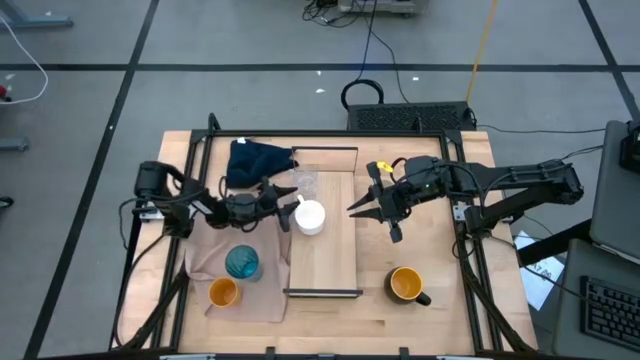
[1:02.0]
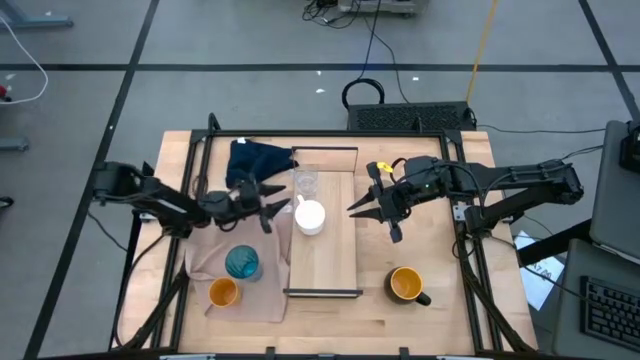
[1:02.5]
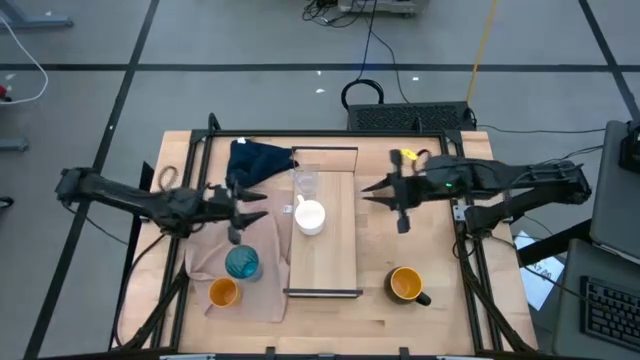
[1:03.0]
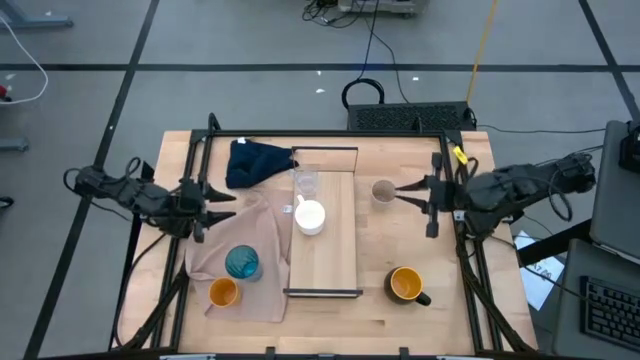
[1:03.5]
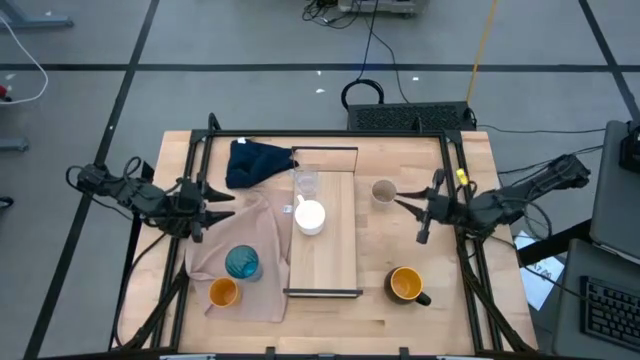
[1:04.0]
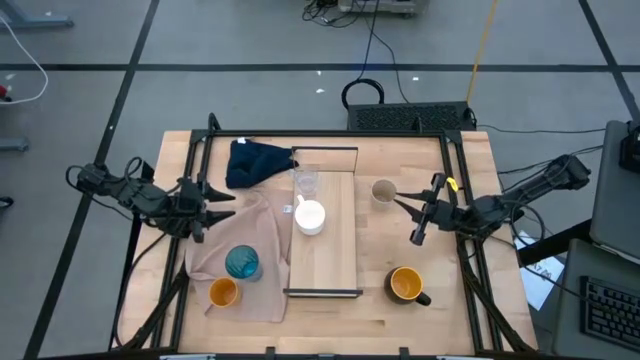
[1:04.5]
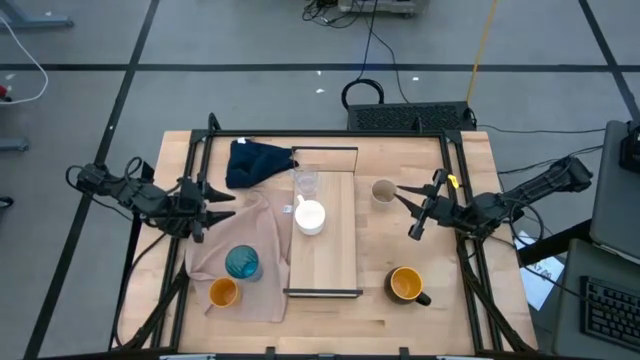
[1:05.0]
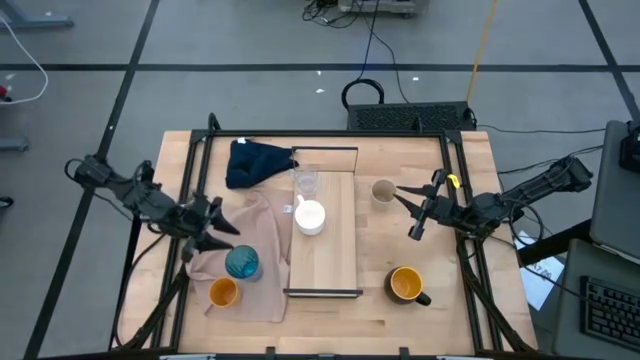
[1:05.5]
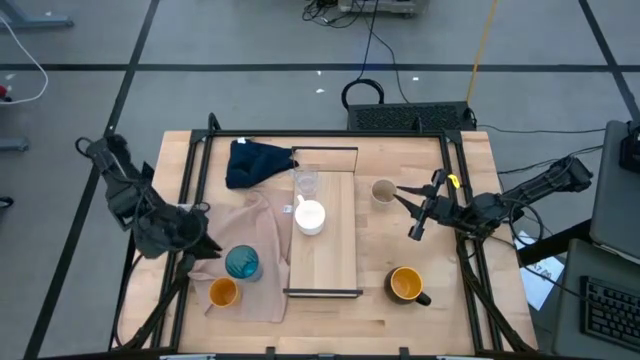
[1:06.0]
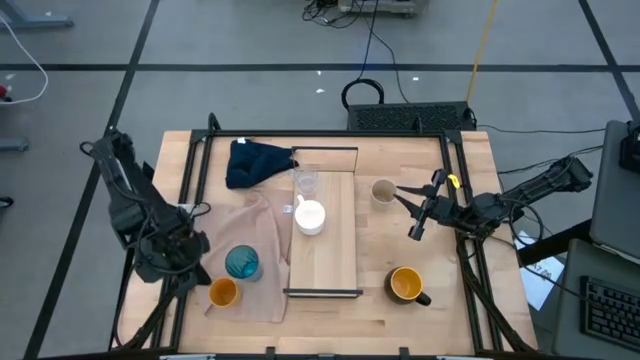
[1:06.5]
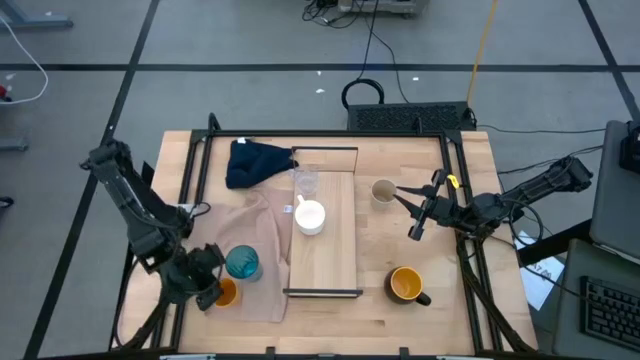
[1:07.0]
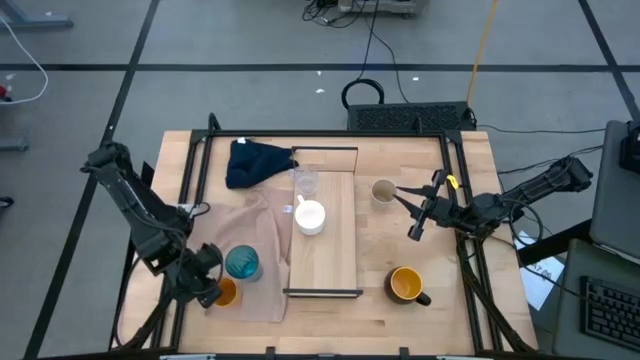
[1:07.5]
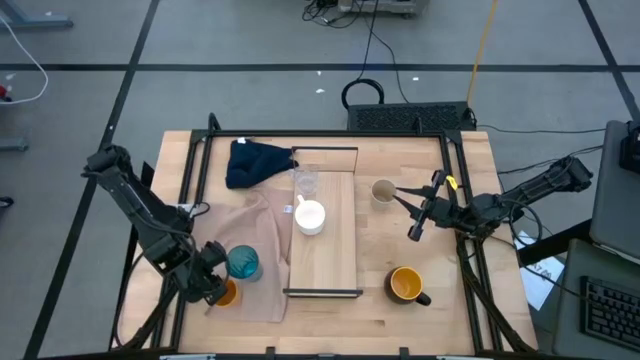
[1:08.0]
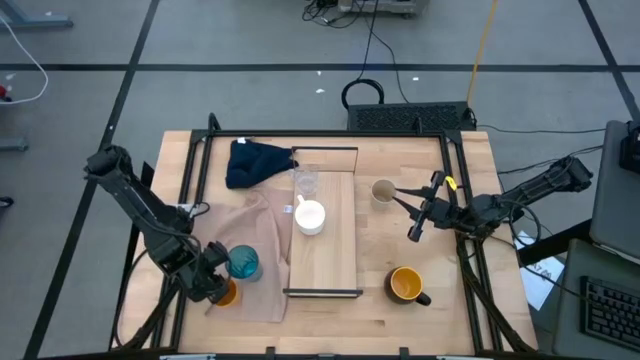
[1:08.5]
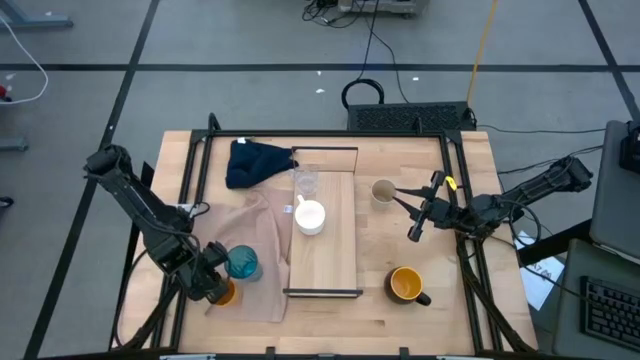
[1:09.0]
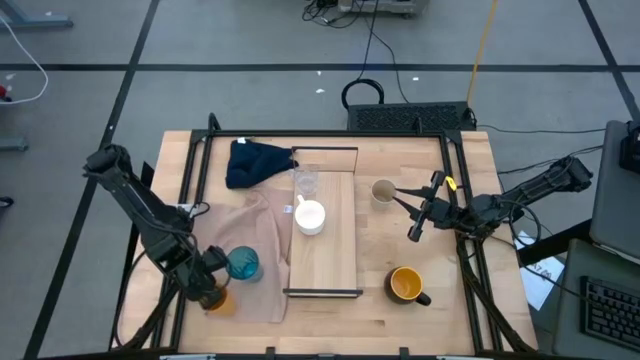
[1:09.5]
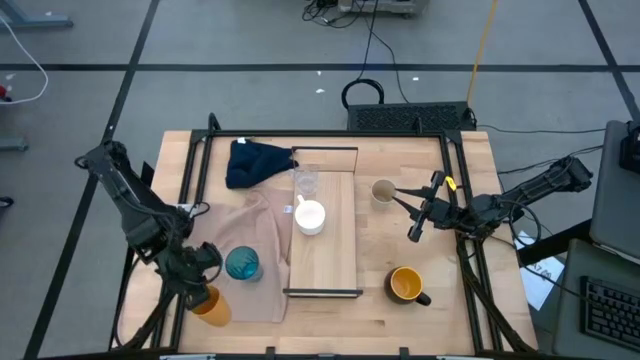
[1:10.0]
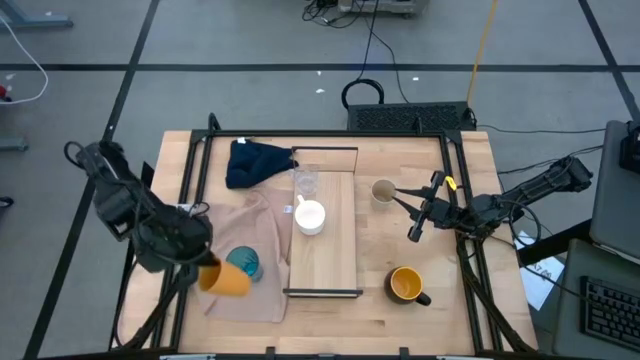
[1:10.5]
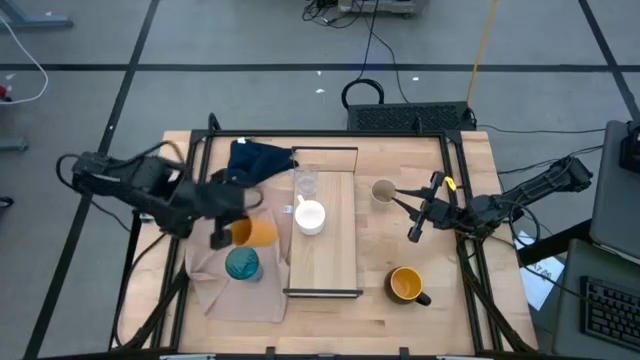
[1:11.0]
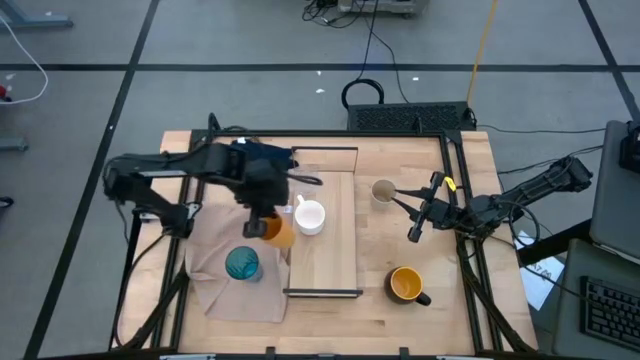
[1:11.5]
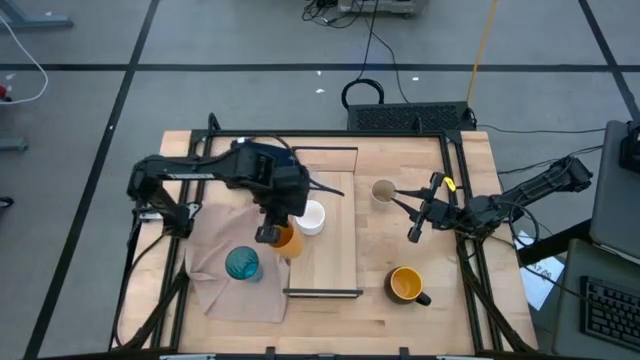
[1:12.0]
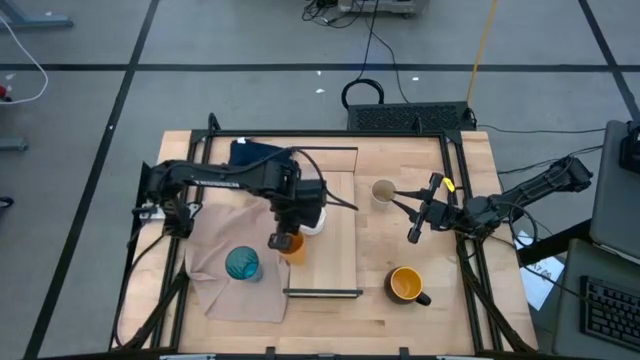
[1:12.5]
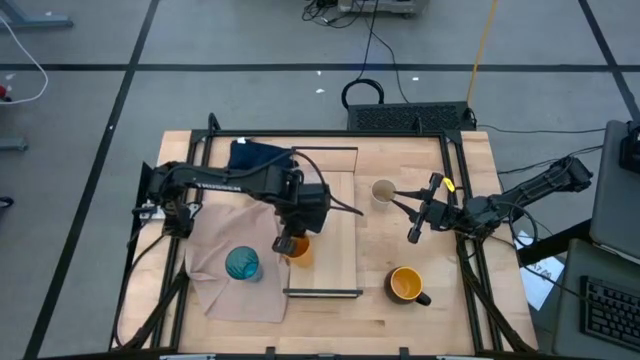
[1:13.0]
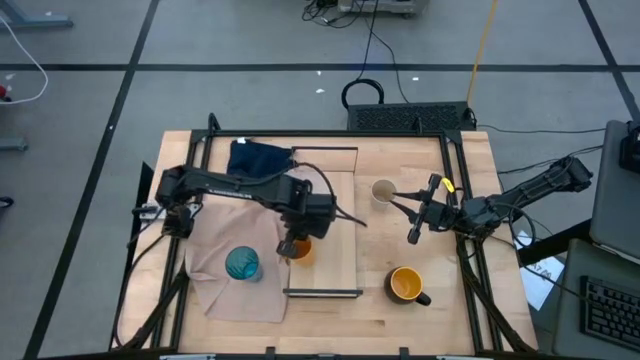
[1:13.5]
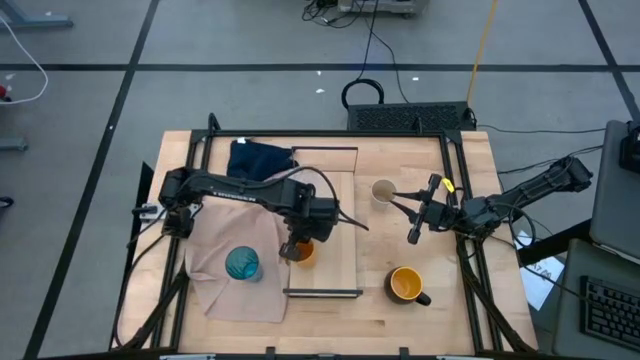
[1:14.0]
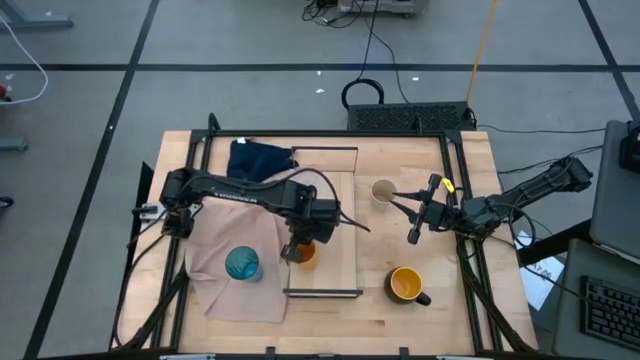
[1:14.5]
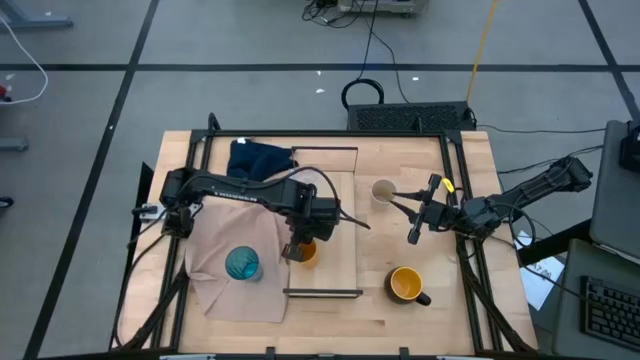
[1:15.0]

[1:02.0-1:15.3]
Task: Stack small to large cups/mugs on shelf
Put the yellow cup on the shelf

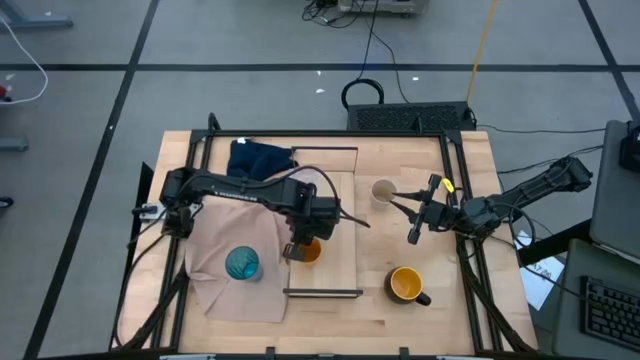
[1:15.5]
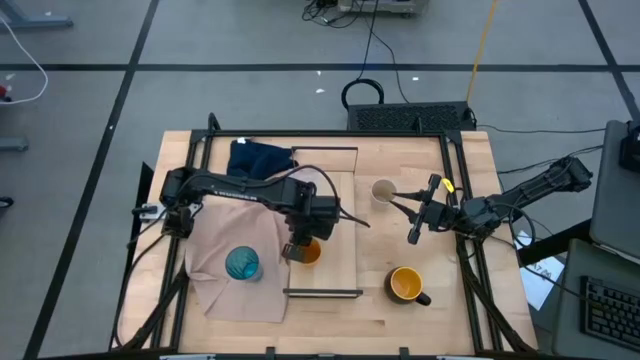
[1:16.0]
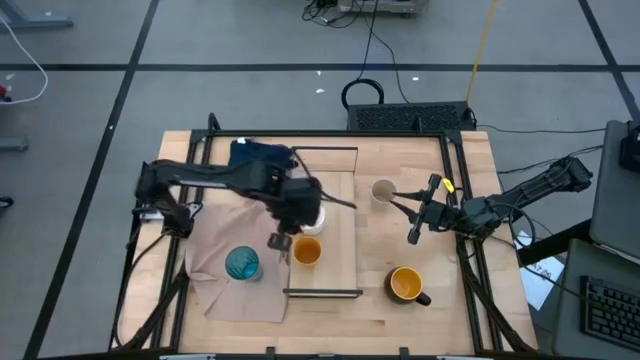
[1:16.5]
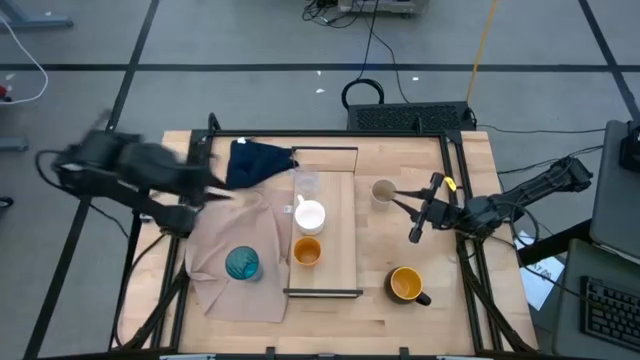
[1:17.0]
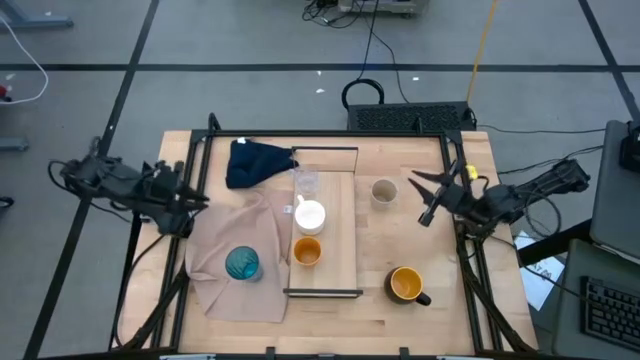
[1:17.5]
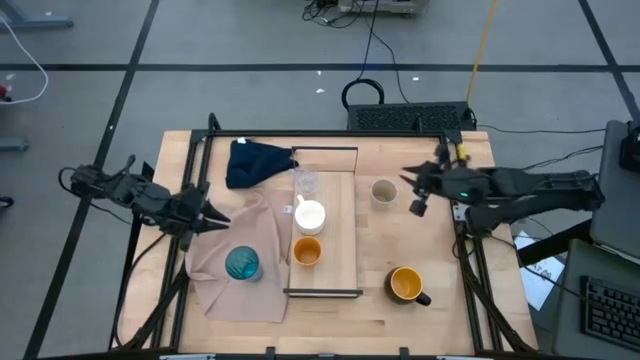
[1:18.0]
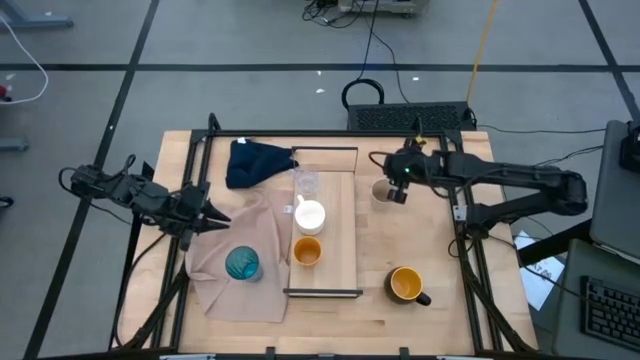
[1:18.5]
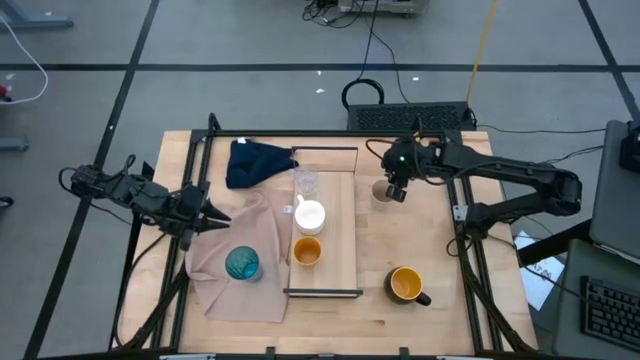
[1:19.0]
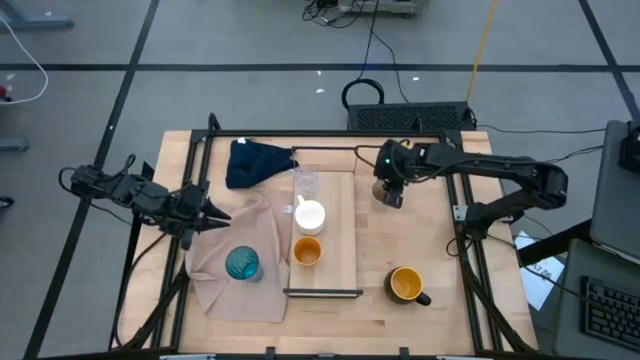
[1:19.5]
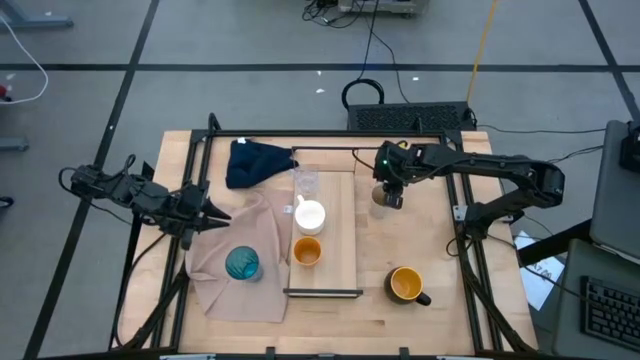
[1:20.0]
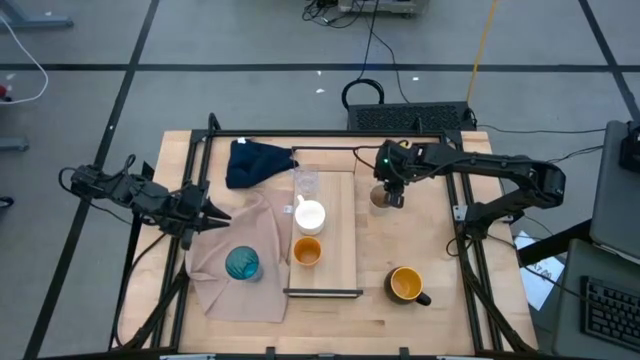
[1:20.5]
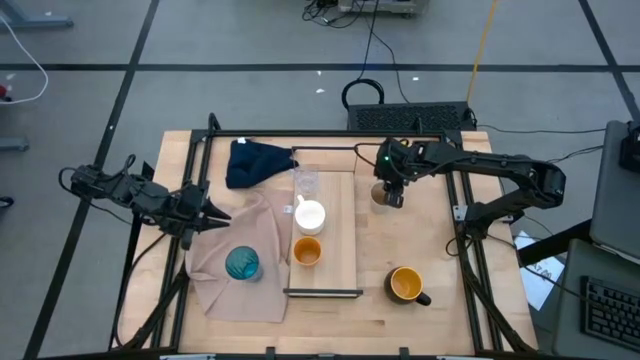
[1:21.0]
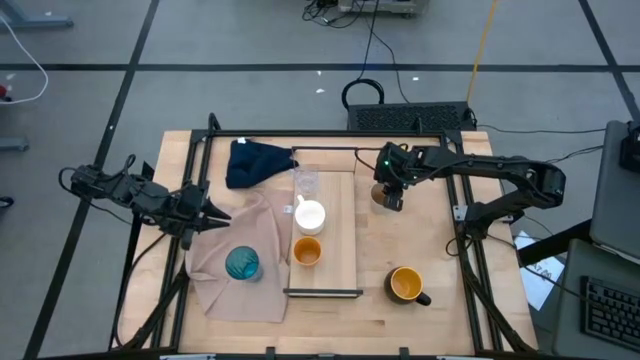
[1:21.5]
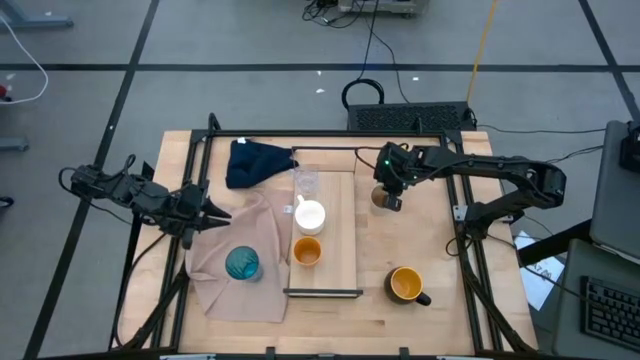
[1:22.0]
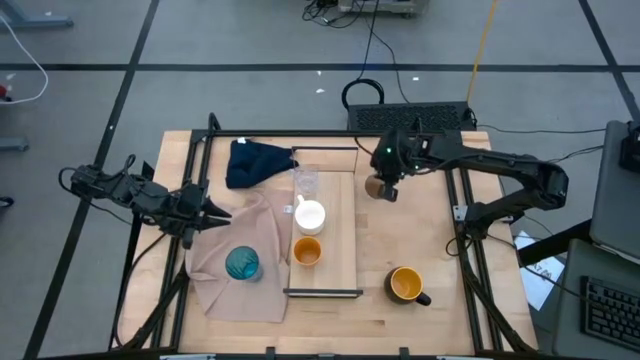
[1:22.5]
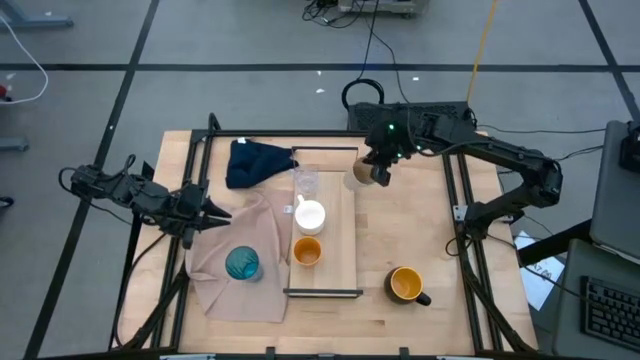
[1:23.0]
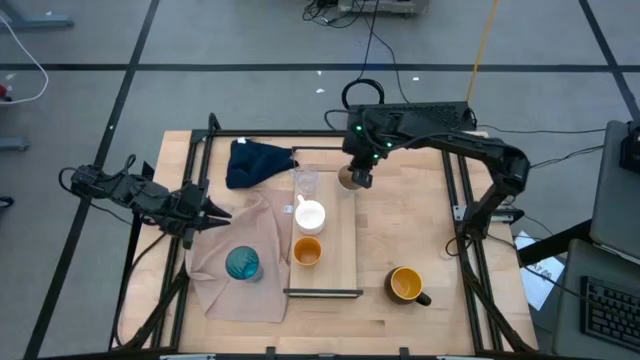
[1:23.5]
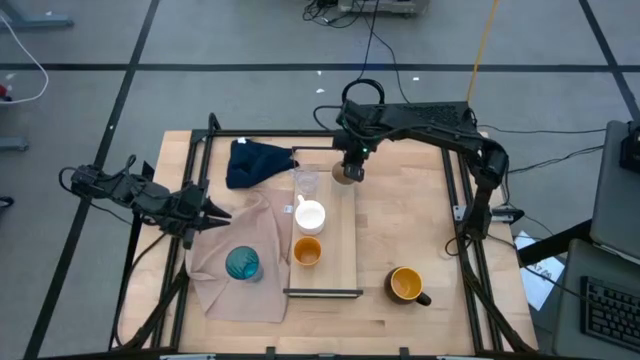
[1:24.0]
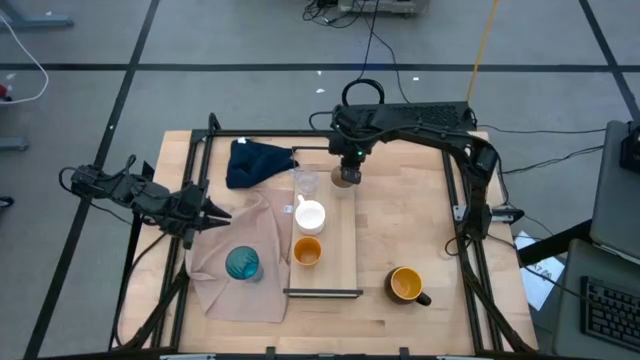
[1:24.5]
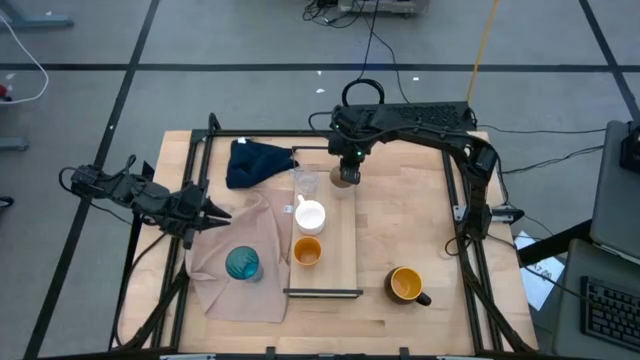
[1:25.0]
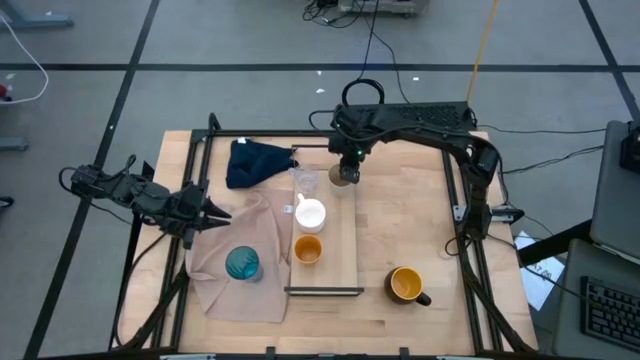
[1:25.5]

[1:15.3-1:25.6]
Put the brown cup on the shelf
